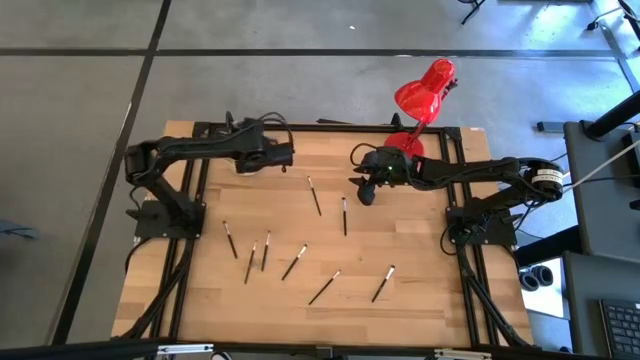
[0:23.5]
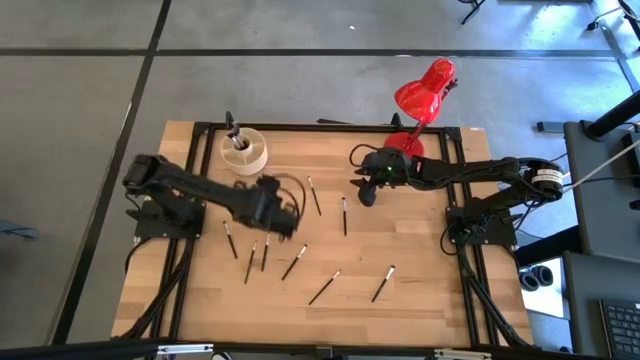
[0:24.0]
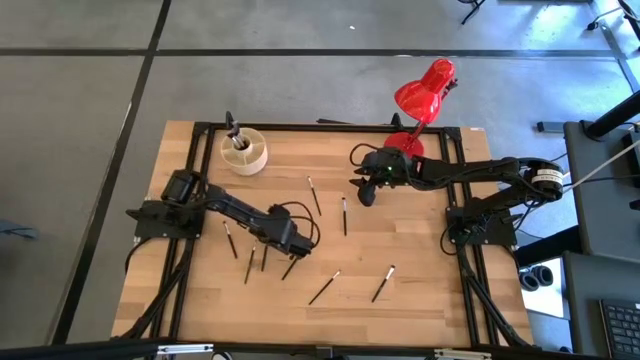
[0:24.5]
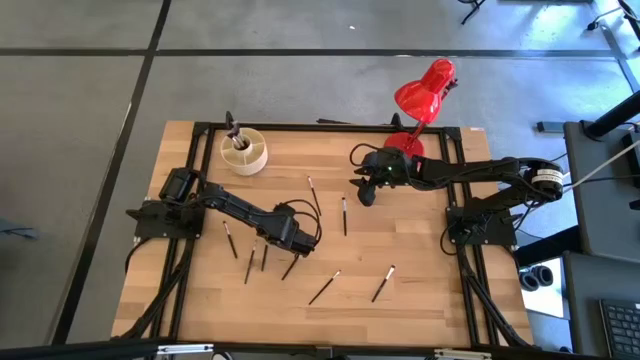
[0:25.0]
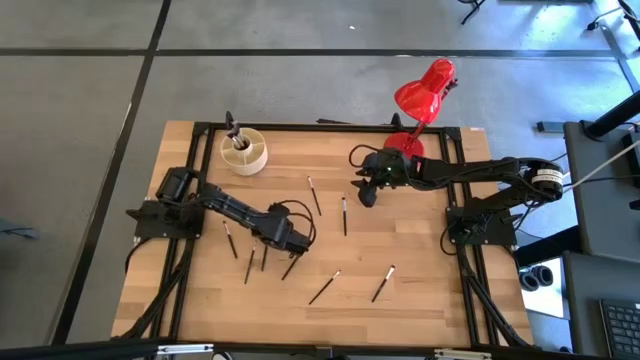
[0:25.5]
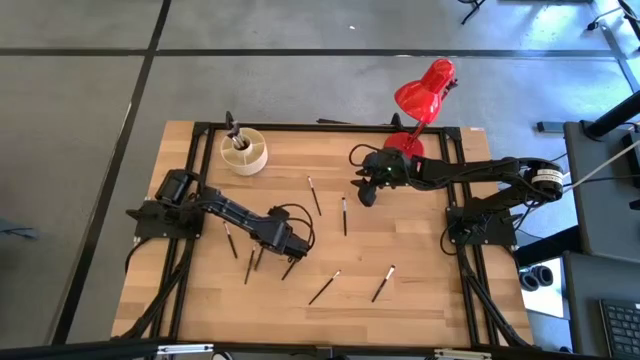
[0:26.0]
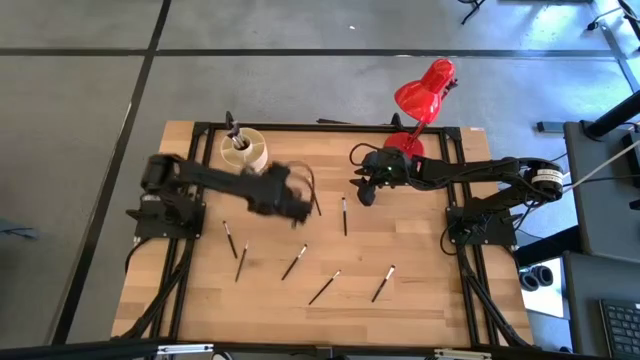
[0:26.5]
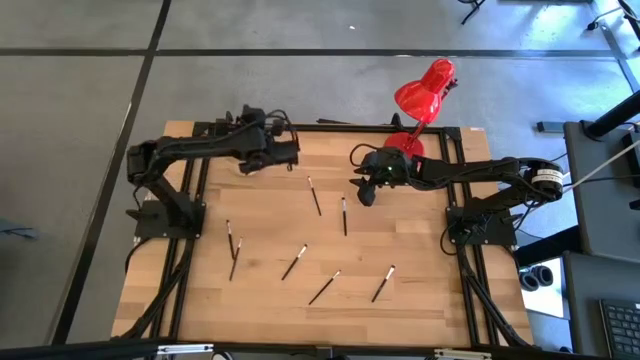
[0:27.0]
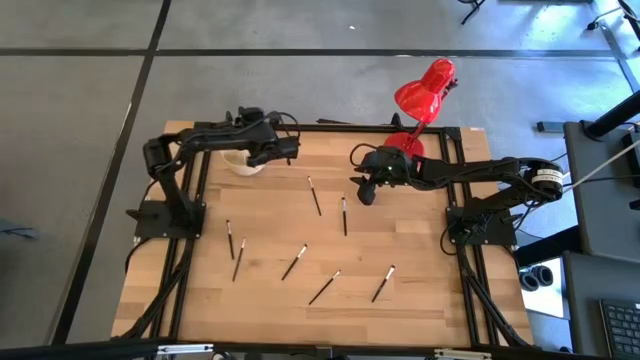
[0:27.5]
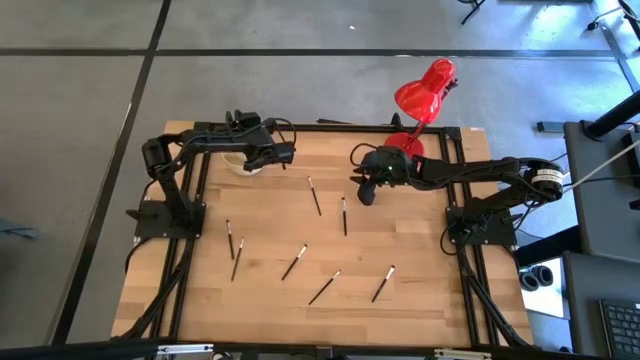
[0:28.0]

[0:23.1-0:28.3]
Task: Put items in baskets/containers
Put the black eyeshadow brush into the white organizer

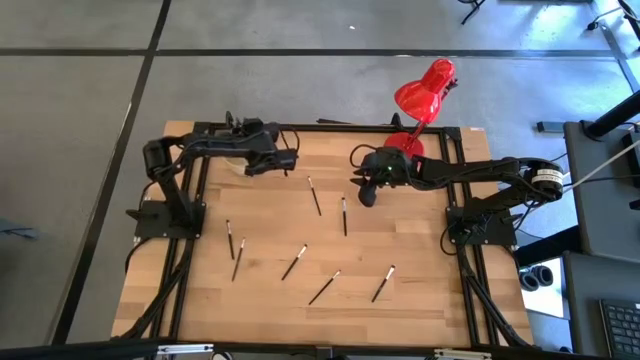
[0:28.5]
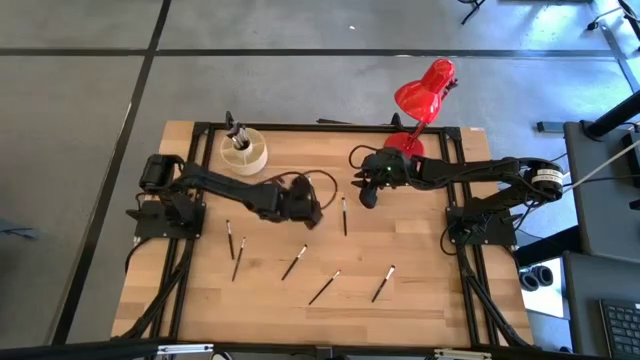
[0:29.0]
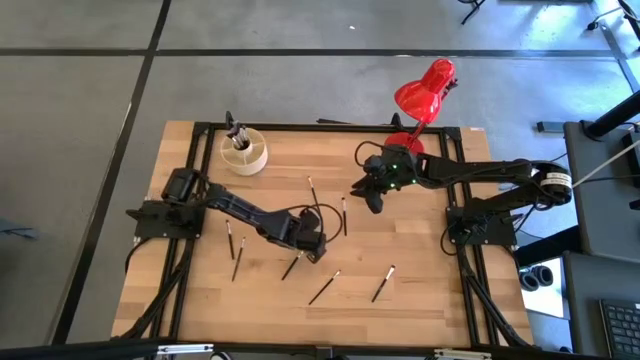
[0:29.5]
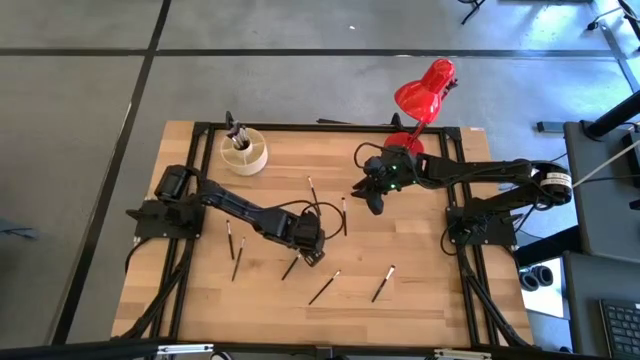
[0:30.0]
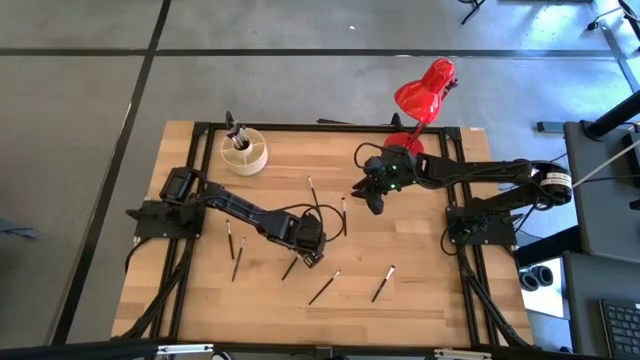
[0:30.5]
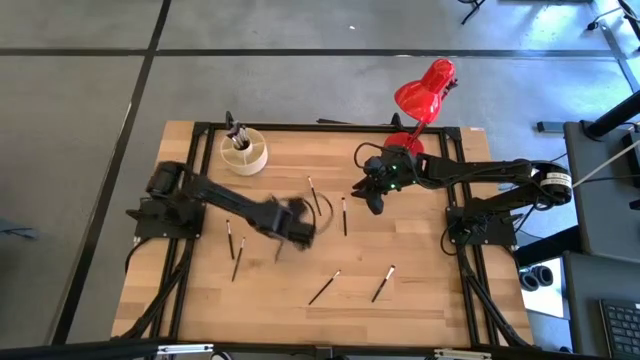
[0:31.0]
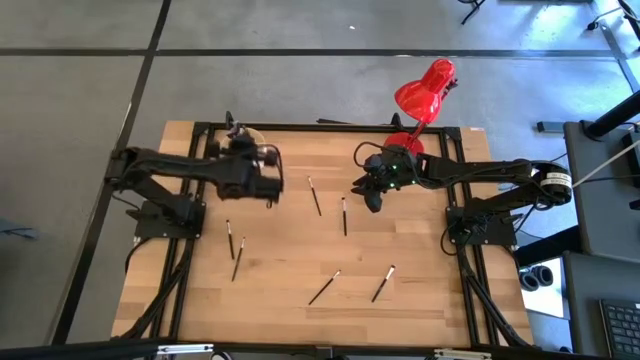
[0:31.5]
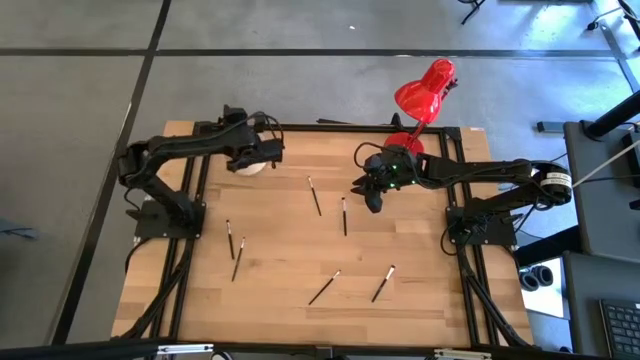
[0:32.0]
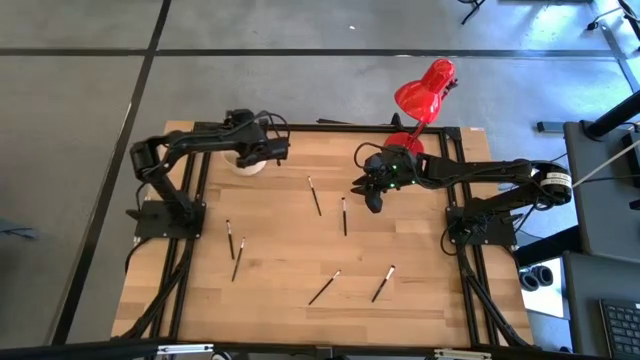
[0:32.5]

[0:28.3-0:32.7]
Put the black eyeshadow brush into the white organizer

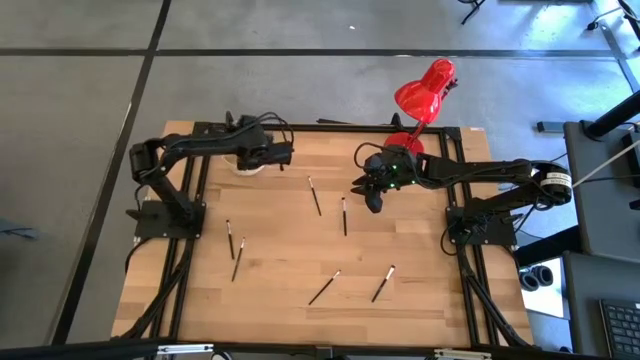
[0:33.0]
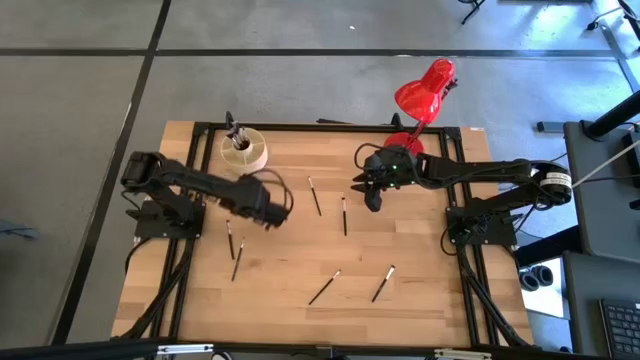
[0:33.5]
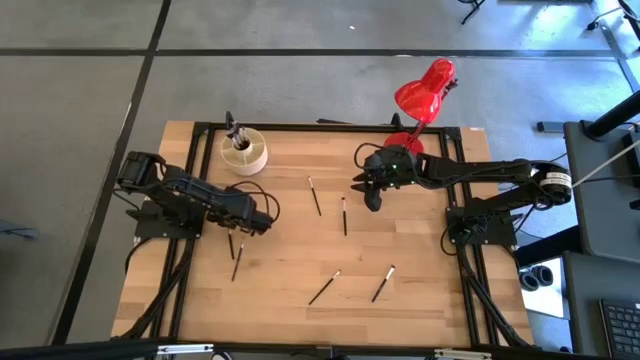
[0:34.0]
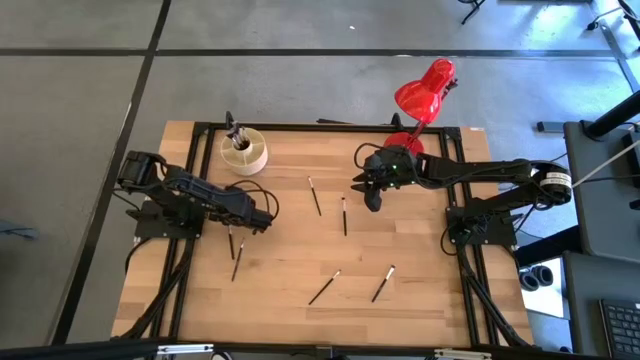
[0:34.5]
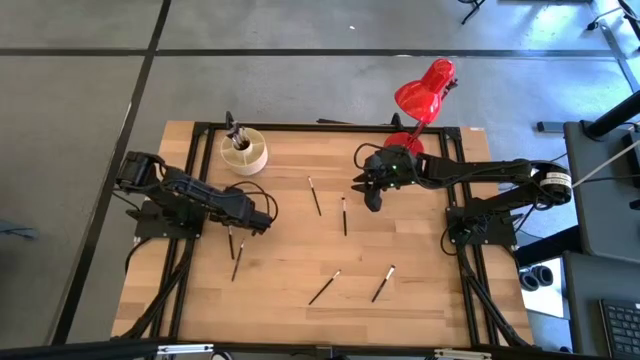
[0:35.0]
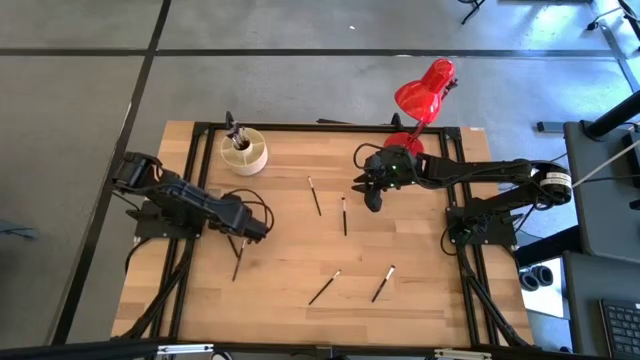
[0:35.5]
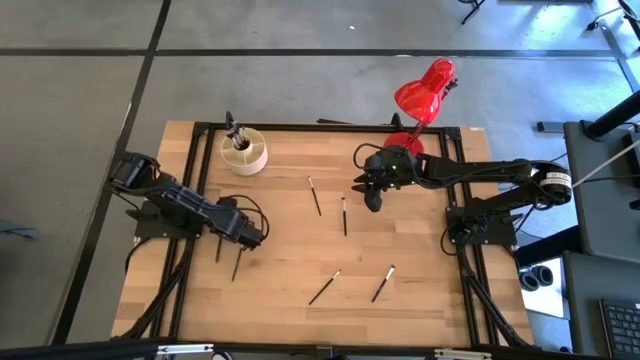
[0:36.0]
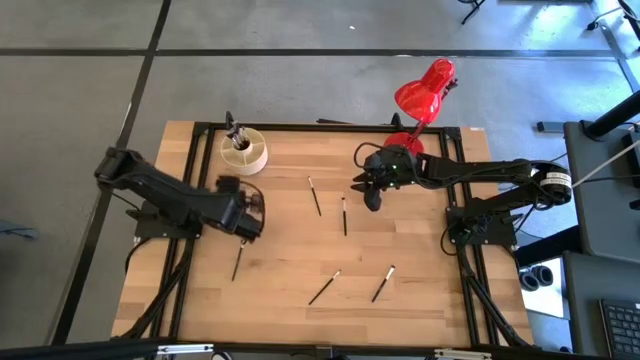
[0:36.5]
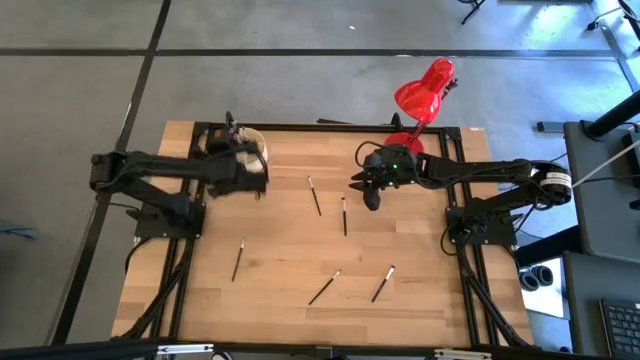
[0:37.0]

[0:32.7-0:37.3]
Put the black eyeshadow brush into the white organizer

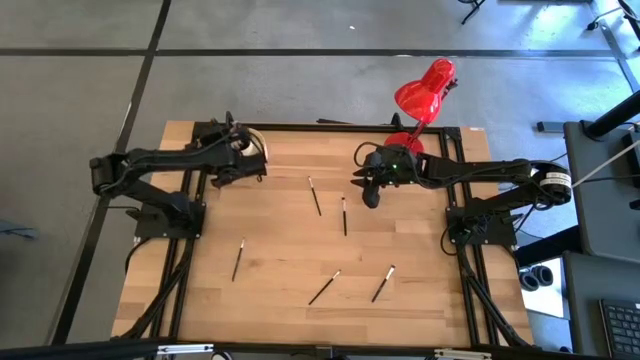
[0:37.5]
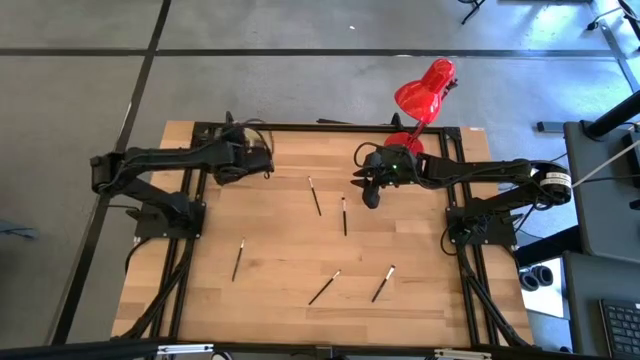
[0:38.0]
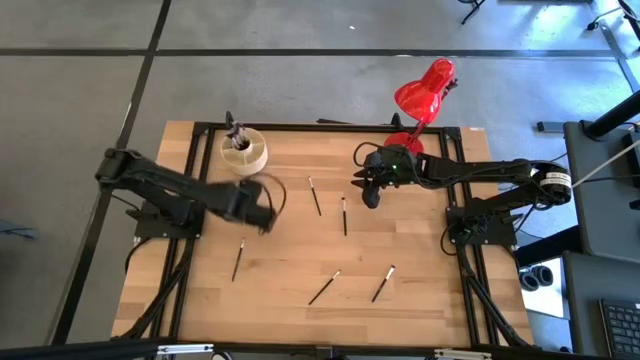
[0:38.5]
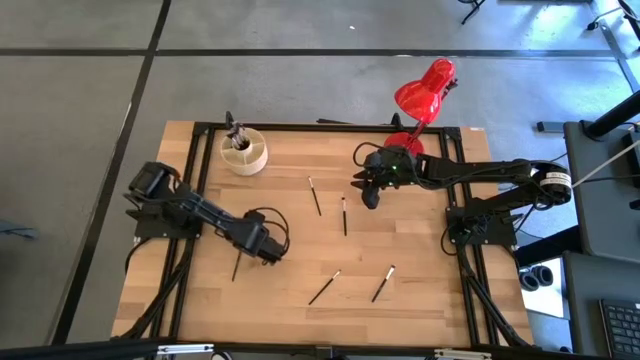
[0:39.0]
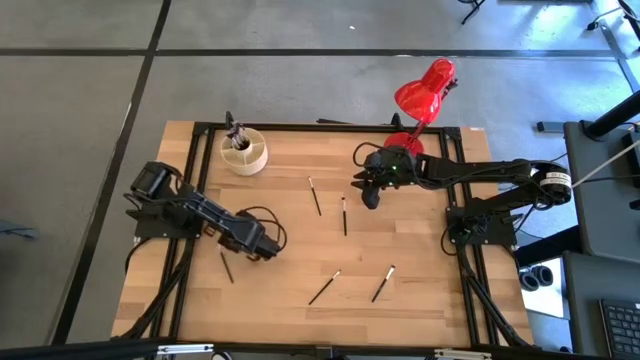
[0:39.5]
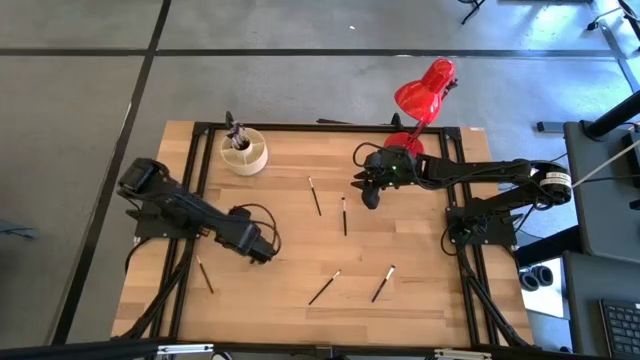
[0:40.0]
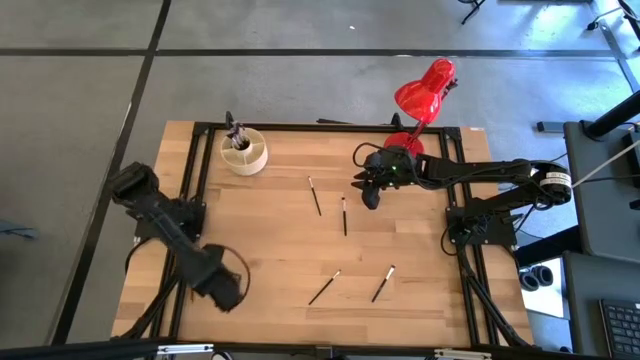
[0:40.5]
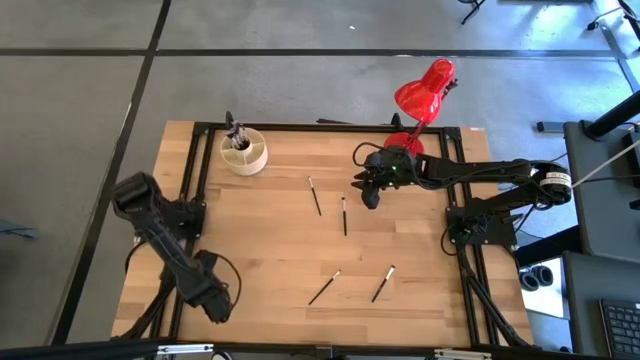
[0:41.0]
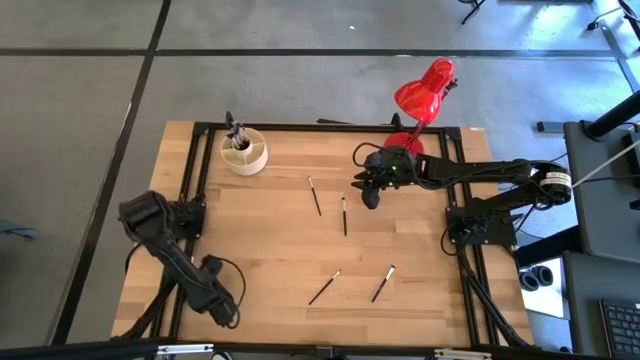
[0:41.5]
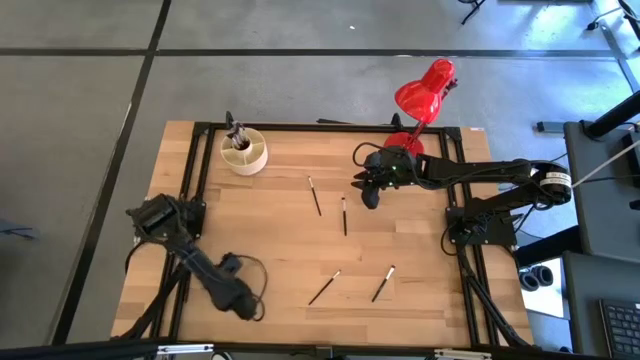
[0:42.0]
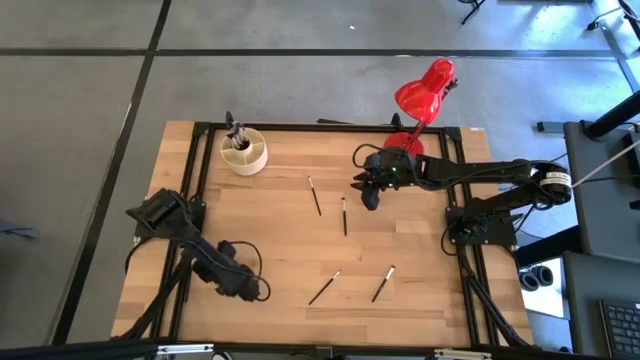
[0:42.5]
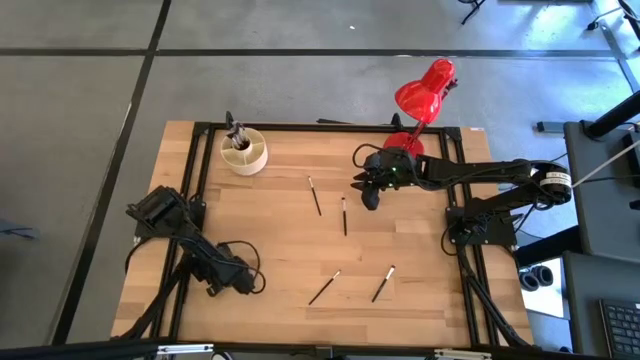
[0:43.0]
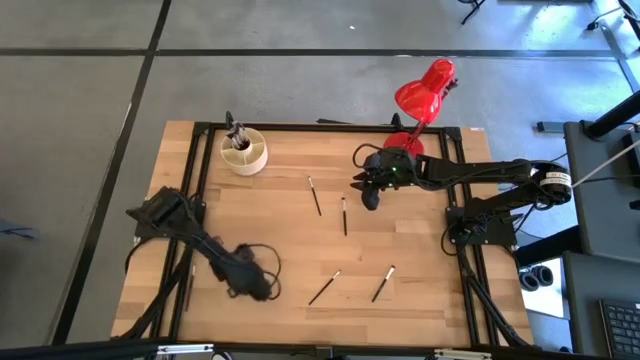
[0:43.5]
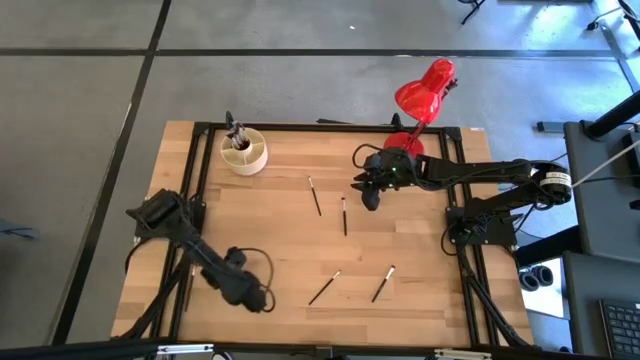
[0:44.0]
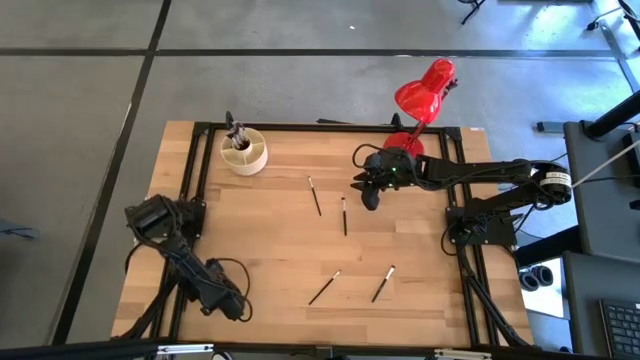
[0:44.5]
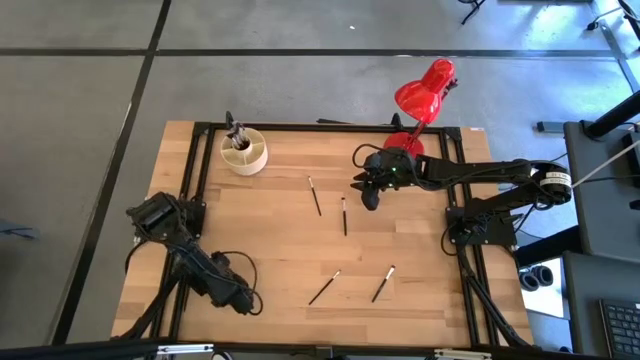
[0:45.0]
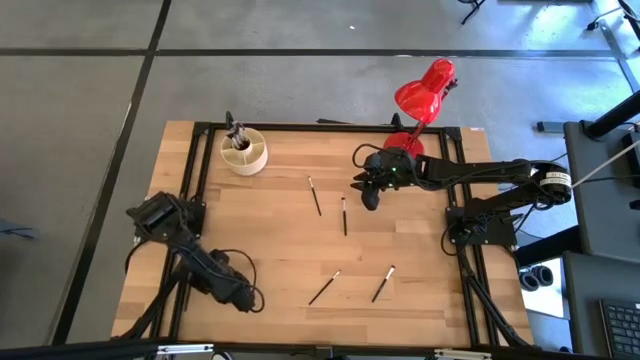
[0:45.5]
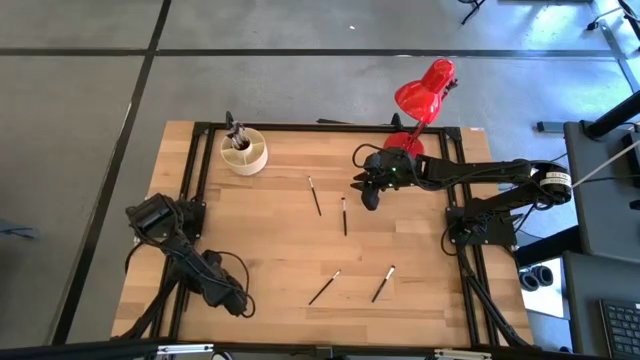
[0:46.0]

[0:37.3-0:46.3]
Put the black eyeshadow brush into the white organizer
